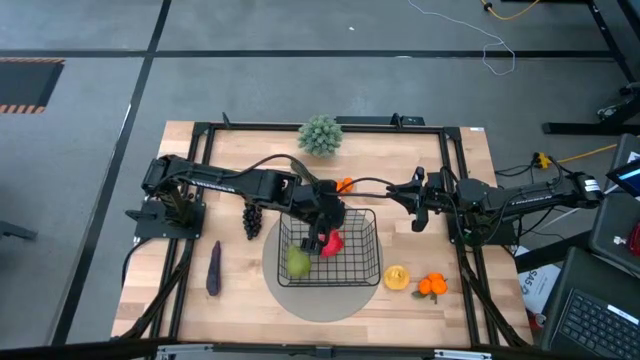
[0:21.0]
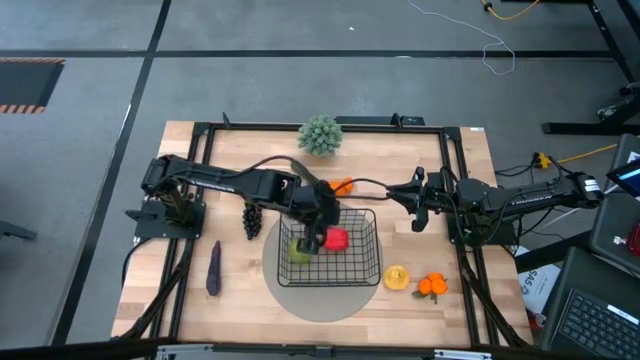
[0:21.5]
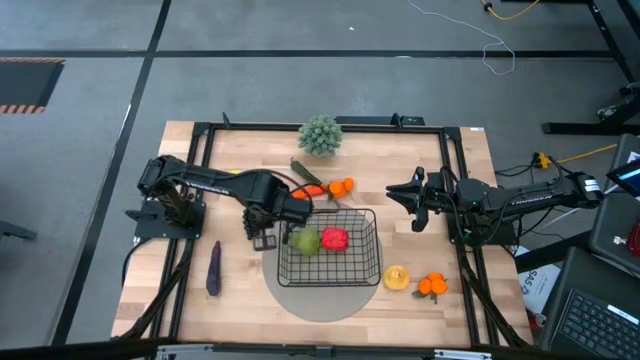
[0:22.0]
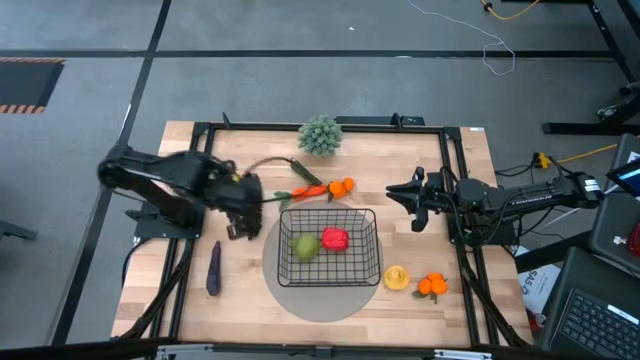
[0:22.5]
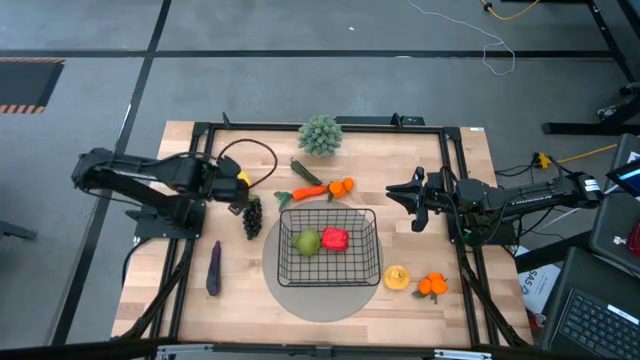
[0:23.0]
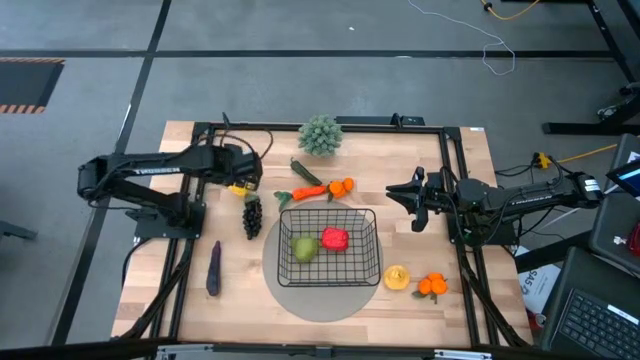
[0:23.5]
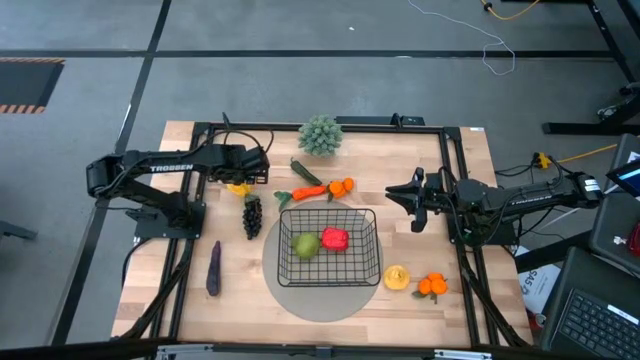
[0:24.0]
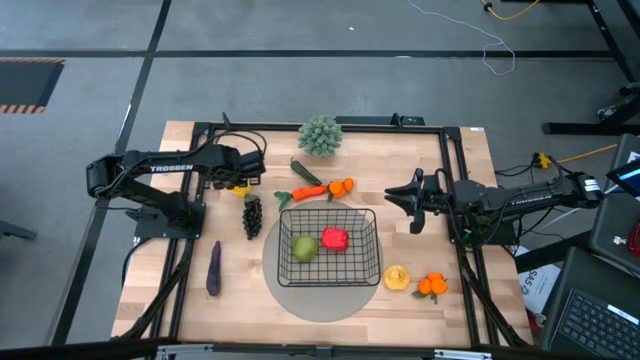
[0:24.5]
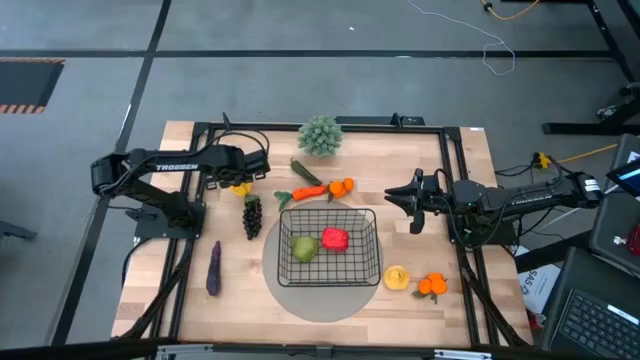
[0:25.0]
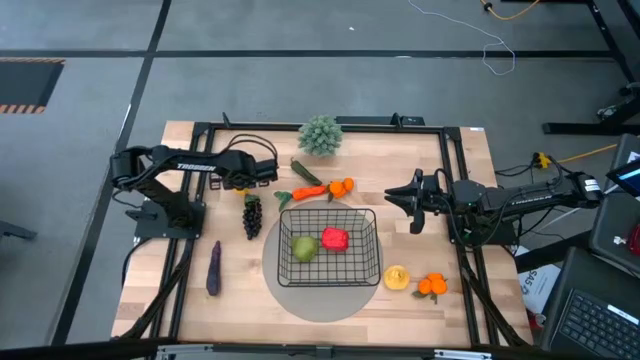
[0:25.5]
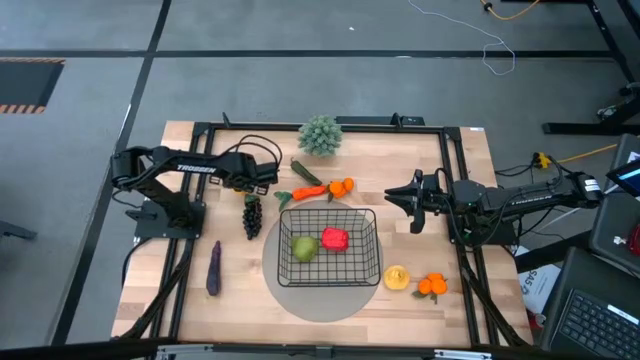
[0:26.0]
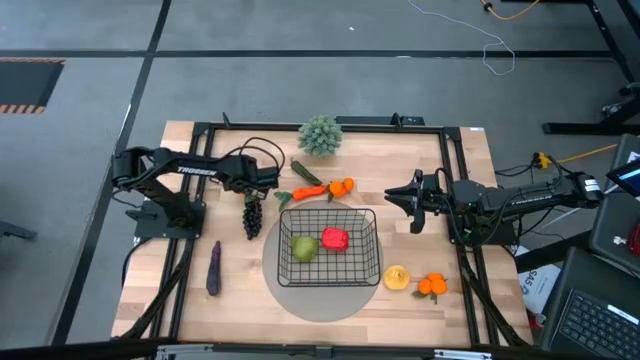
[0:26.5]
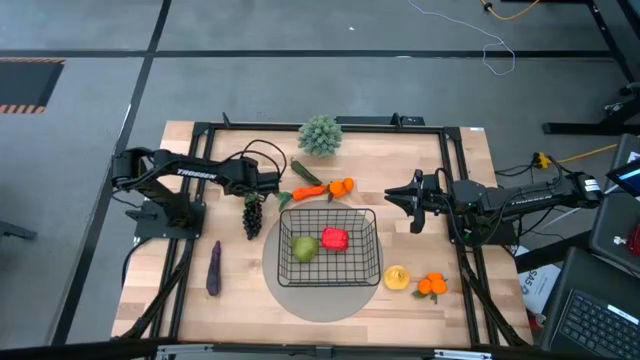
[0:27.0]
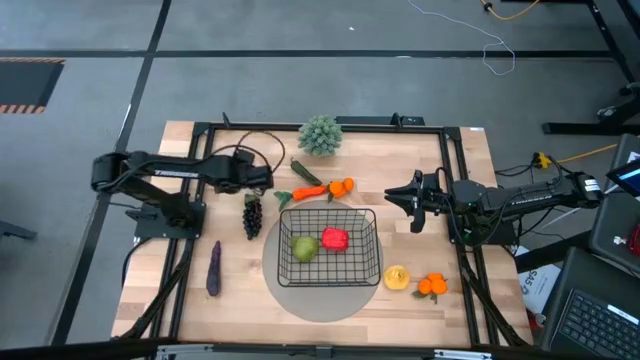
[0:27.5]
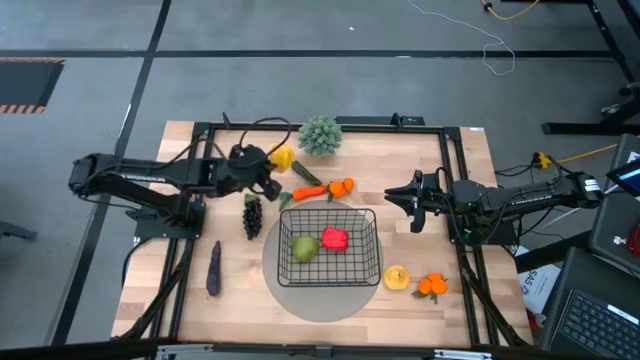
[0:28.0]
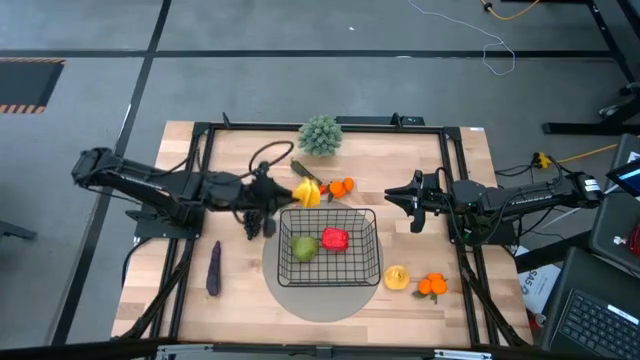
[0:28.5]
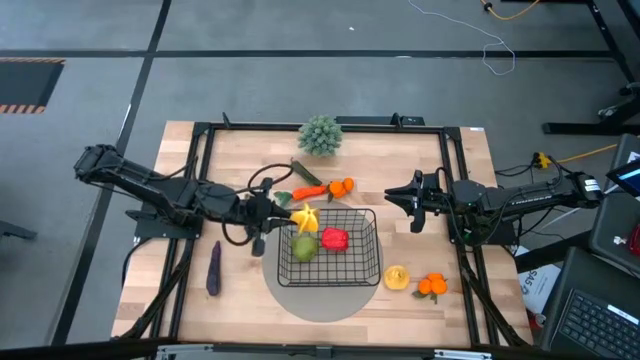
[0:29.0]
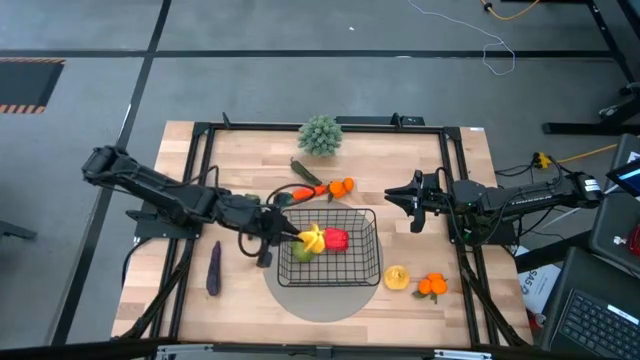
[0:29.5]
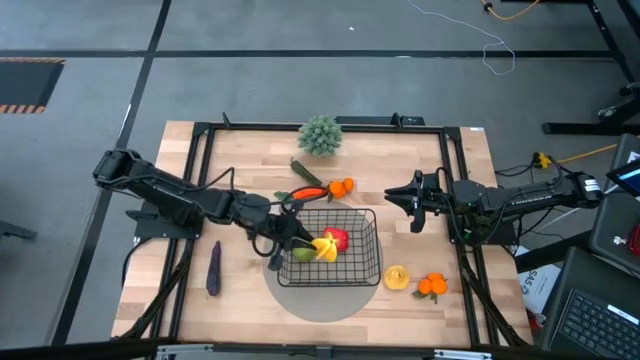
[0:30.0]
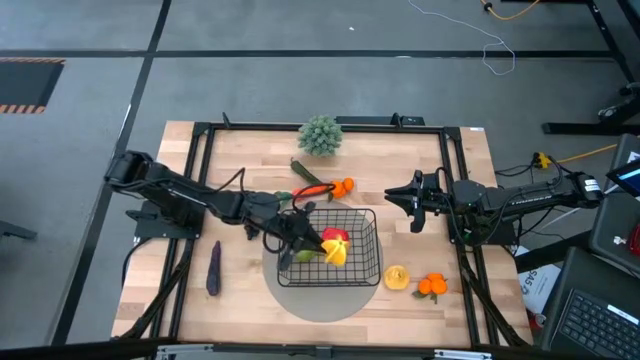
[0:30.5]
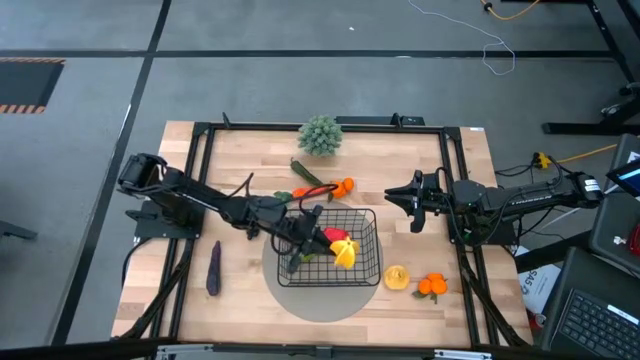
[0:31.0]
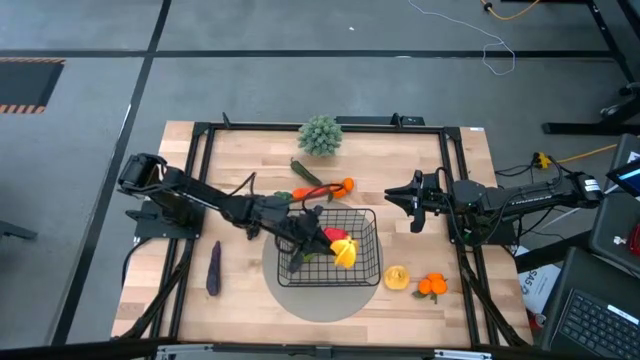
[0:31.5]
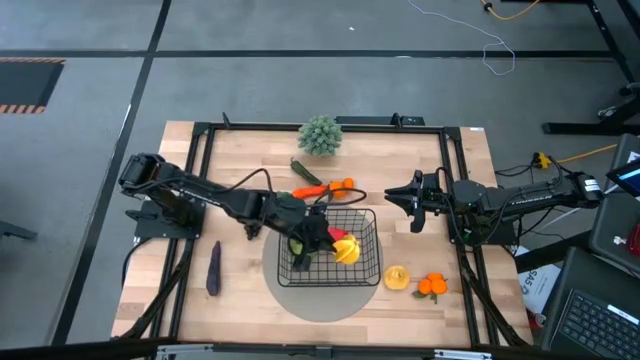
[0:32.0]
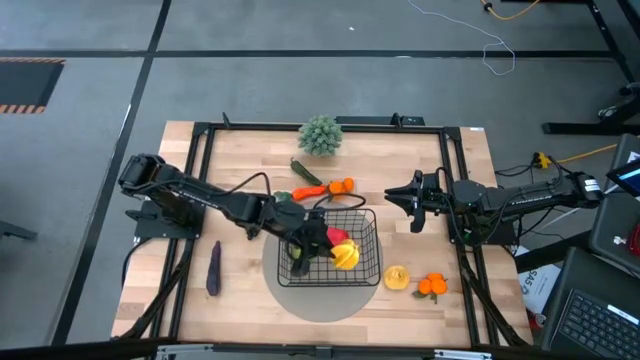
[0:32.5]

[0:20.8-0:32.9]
Task: Build produce basket
Put the yellow star fruit into the black wire basket

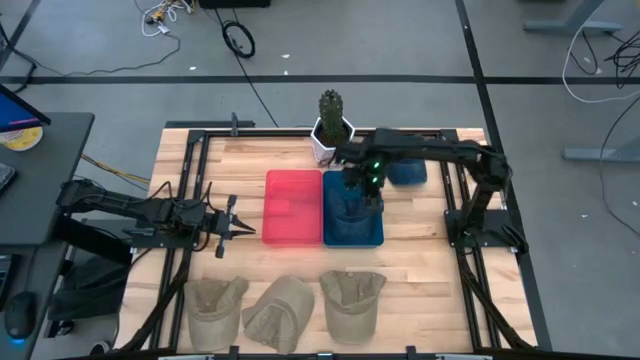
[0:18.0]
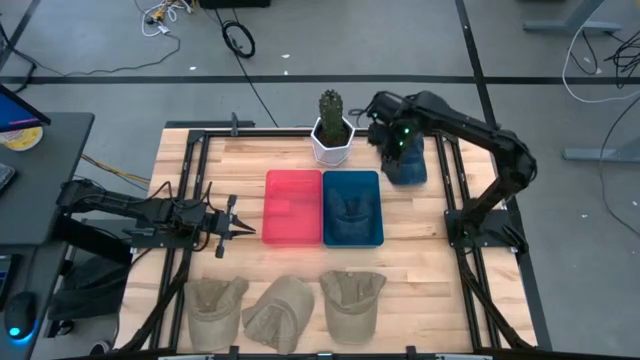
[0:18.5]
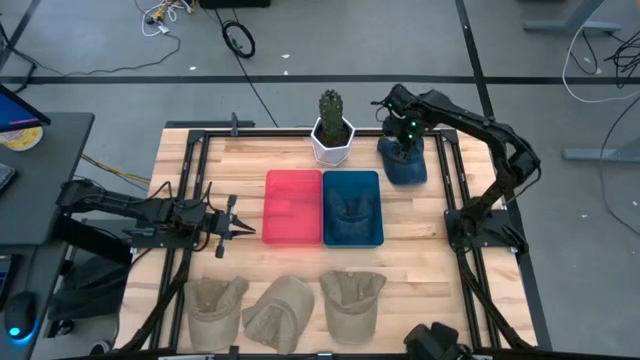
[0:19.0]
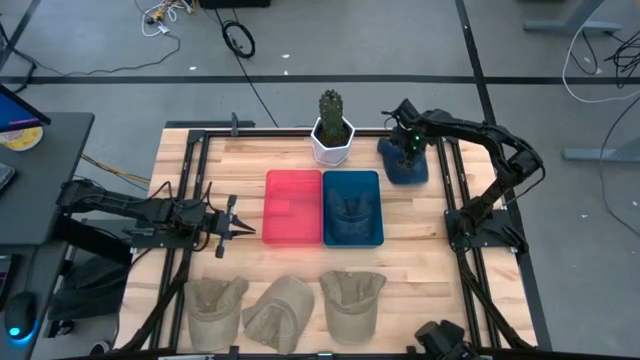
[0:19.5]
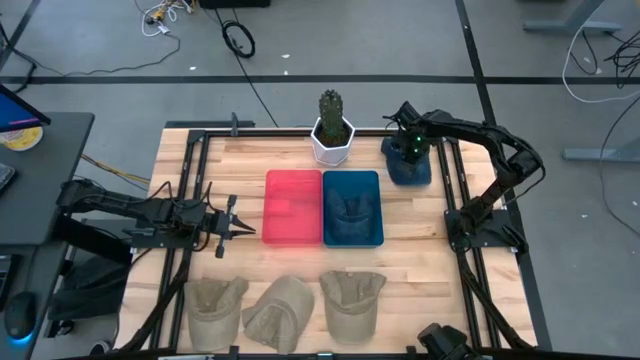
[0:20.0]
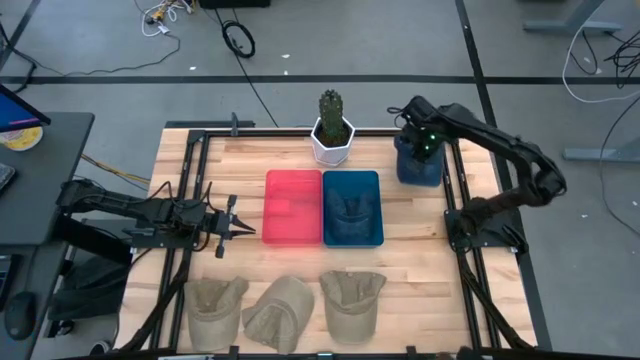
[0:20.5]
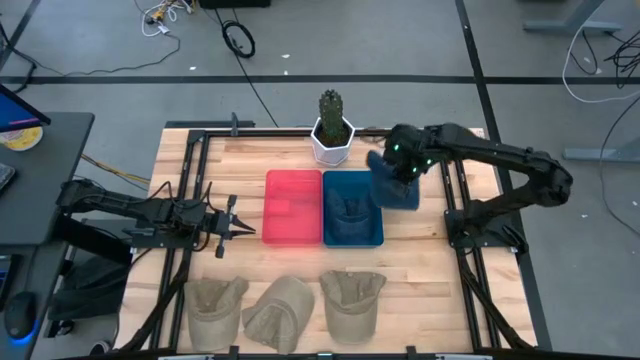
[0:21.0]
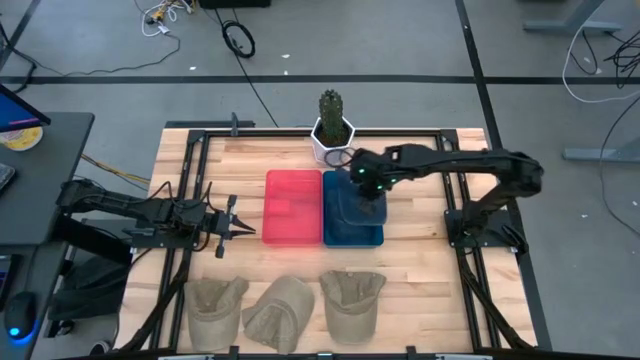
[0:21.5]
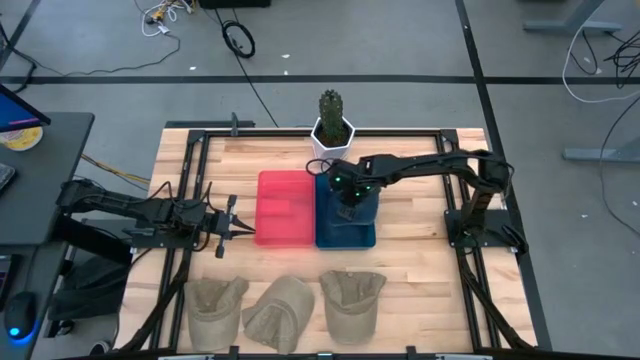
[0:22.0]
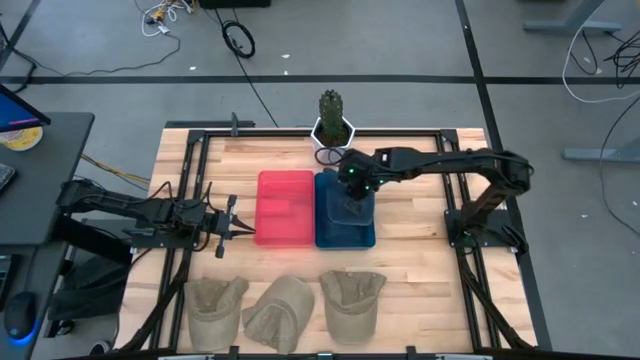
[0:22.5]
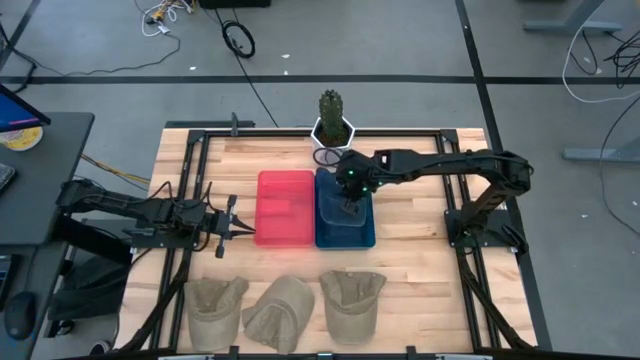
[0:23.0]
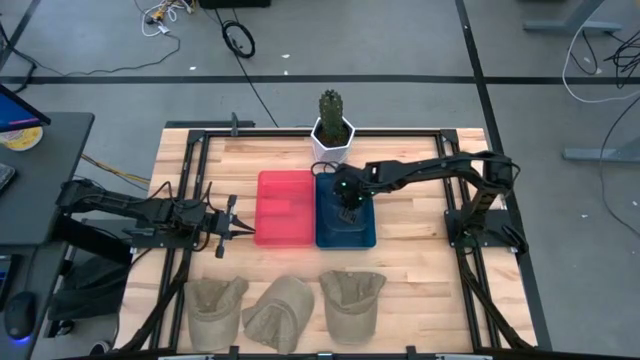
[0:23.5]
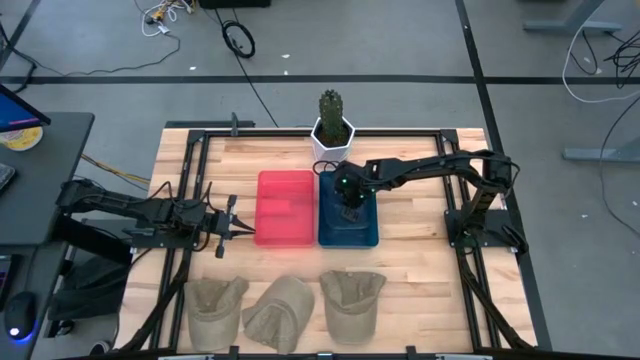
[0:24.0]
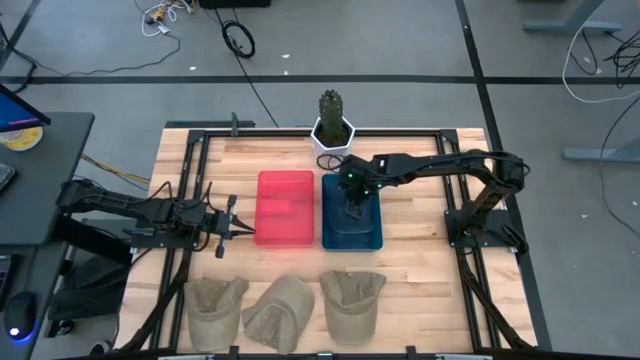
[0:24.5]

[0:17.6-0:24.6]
Task: Pick & Place hat
Put the blue cap into the blue bin

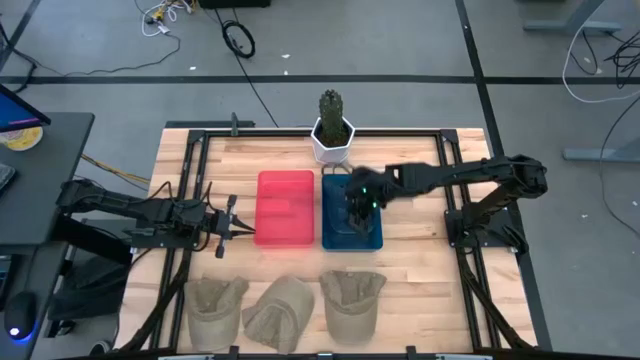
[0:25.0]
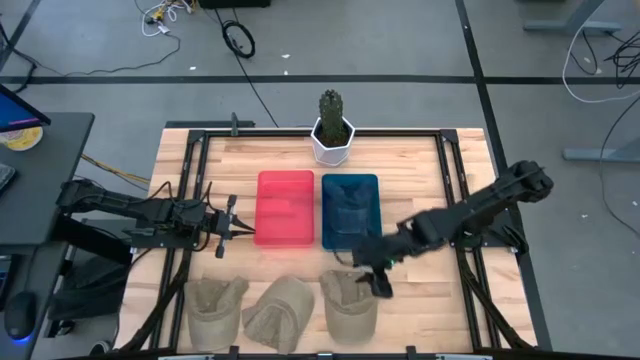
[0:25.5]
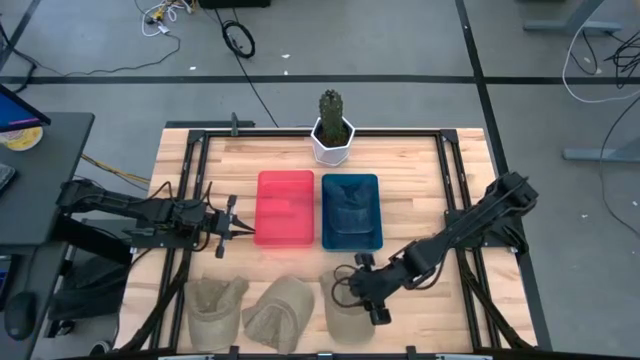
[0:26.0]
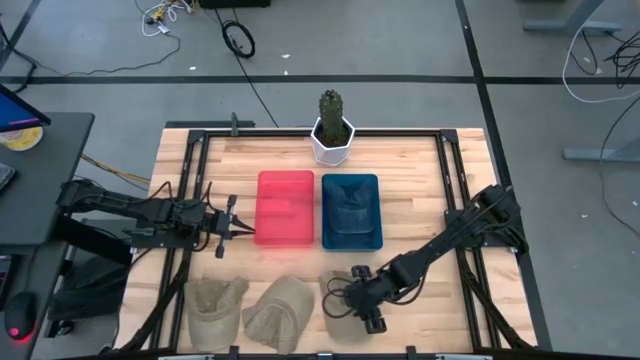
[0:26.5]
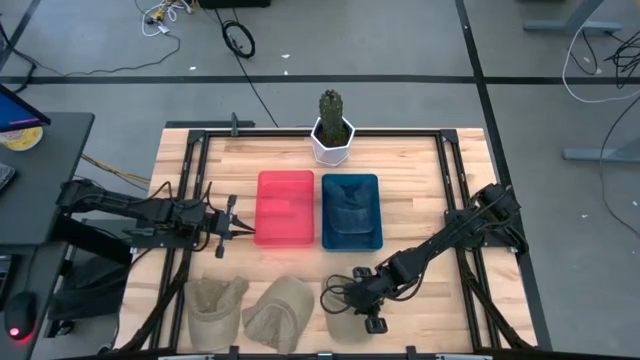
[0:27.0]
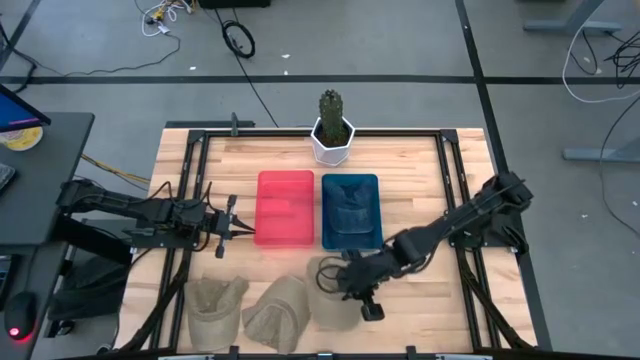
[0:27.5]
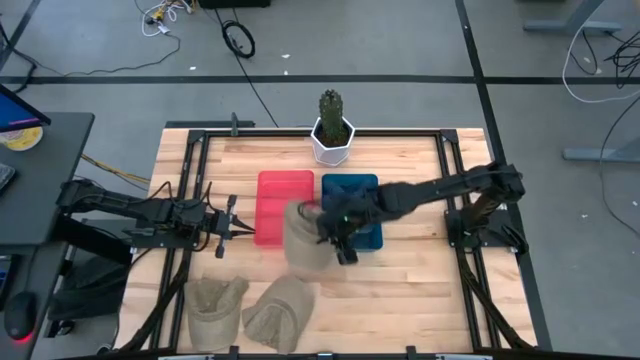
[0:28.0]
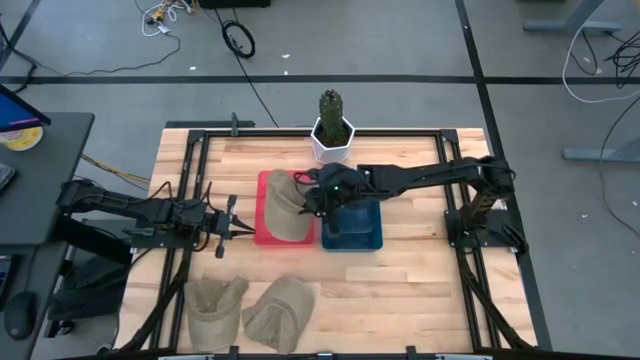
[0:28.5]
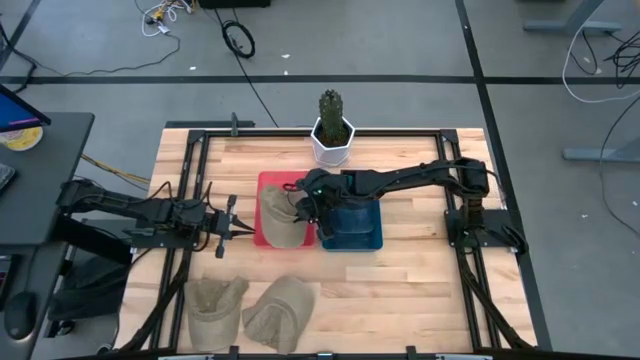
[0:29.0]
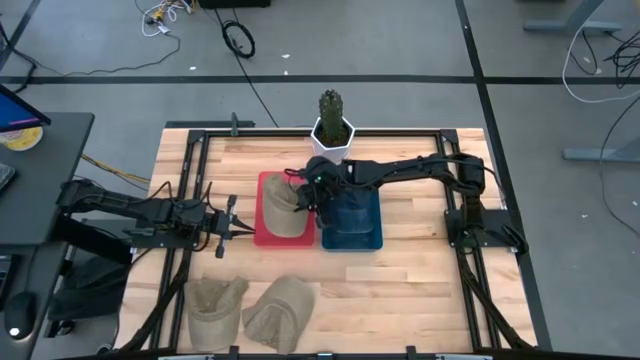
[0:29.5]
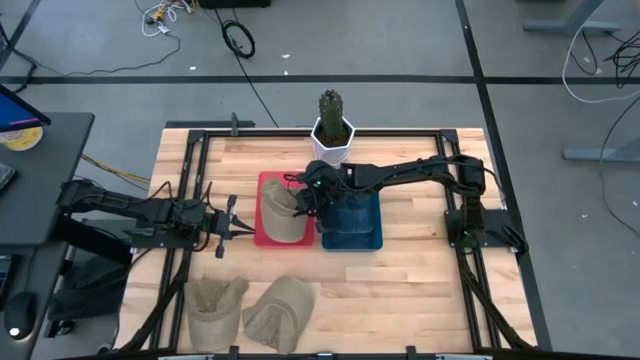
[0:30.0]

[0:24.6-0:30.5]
Put the right brown cap into the pink bin
